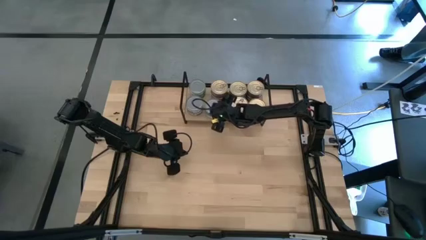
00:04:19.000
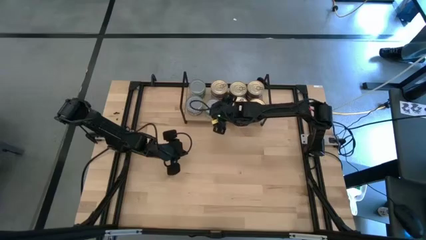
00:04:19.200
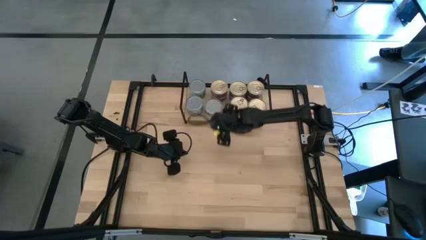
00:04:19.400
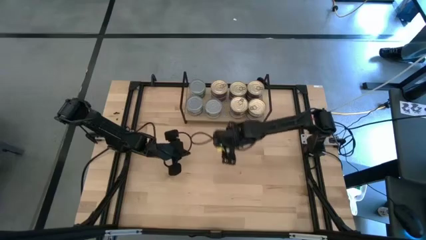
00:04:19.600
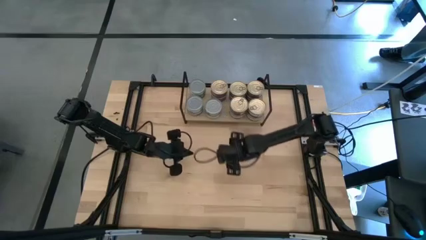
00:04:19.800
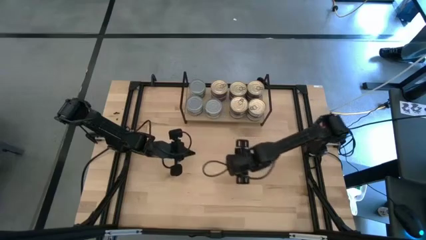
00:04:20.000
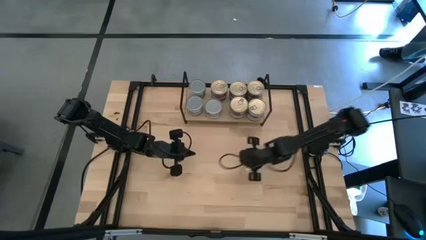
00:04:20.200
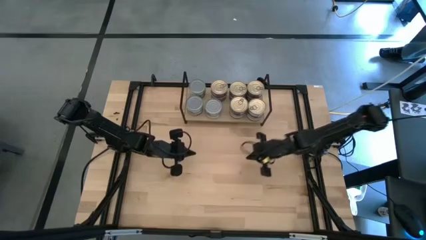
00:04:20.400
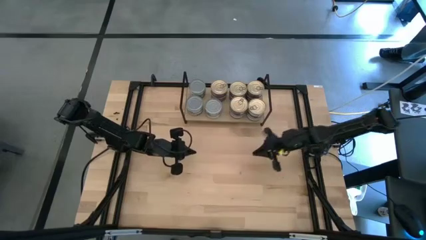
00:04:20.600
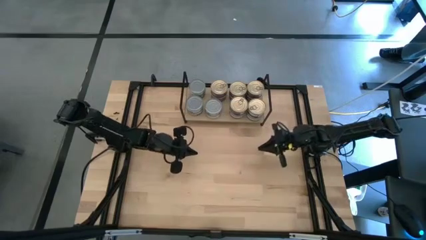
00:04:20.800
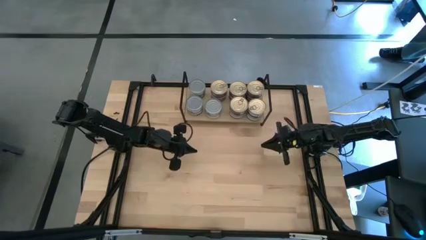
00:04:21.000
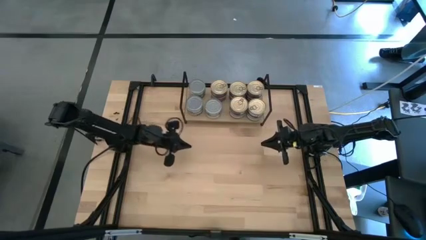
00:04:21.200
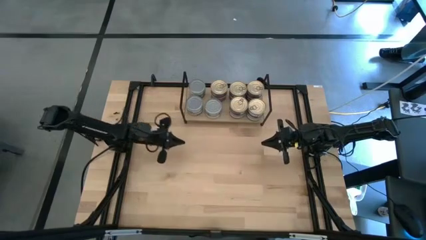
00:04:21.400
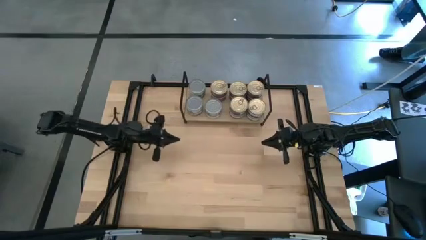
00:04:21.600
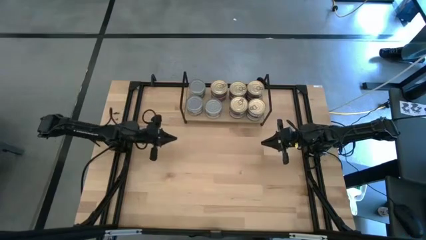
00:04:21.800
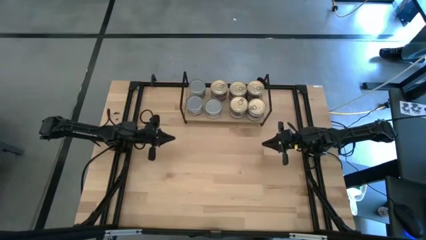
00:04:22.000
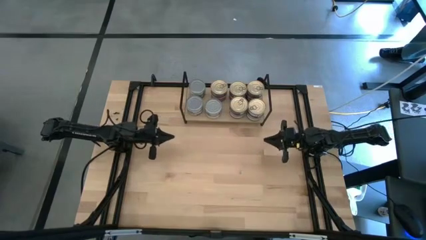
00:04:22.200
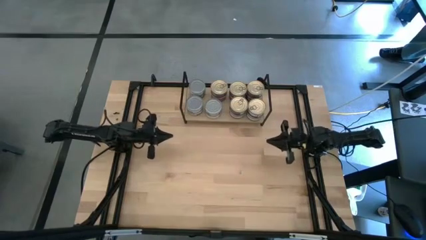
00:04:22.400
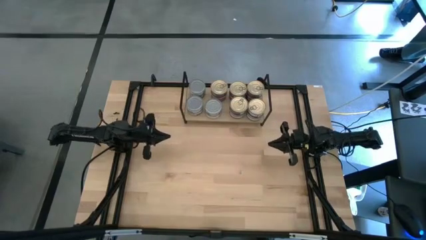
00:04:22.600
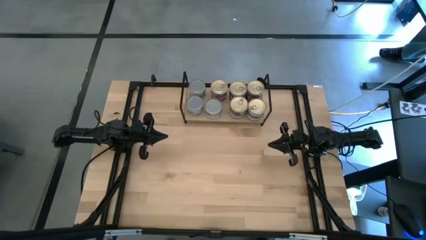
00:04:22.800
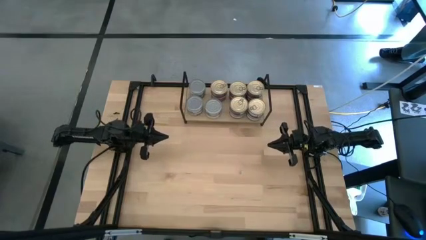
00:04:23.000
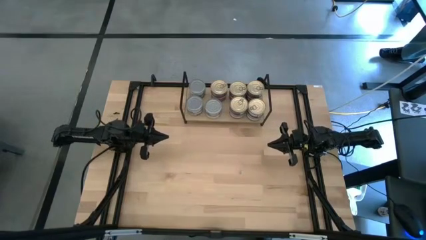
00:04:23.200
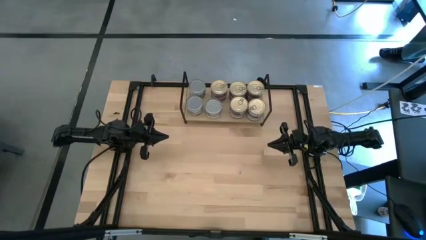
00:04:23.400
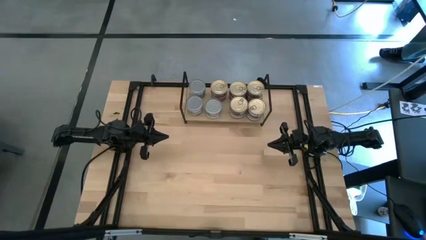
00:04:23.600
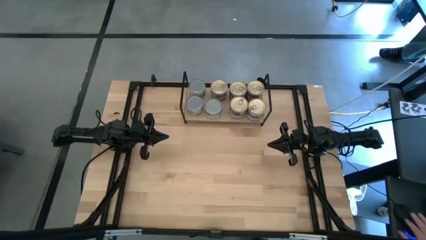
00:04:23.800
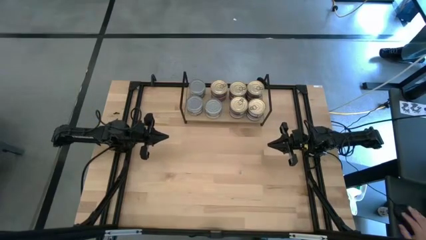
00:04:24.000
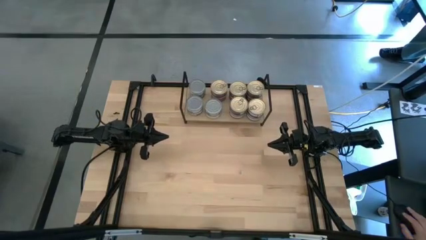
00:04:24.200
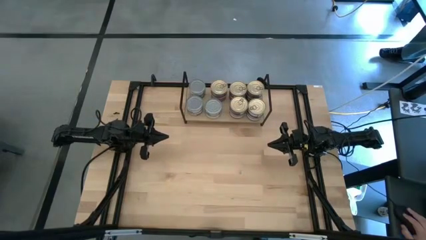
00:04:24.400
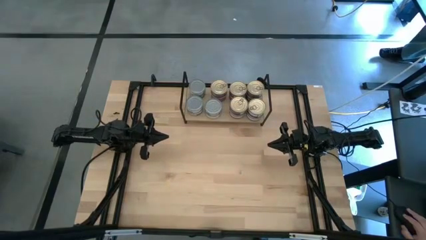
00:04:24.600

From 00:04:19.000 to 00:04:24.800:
Task: Stack canned seafood by type on shelf
Return to Home Position

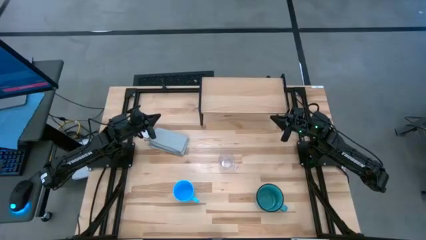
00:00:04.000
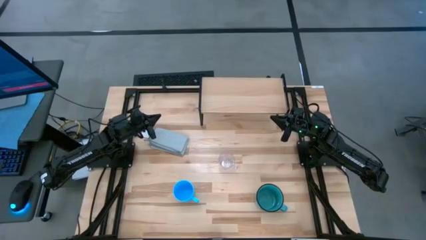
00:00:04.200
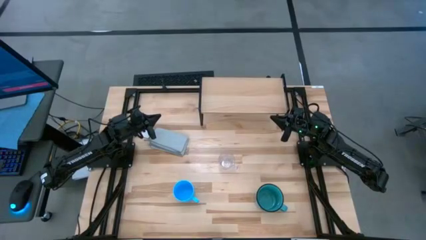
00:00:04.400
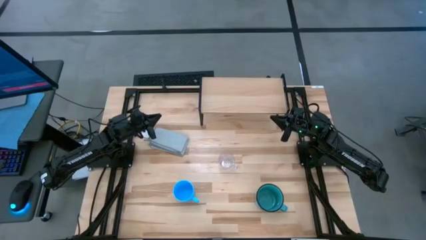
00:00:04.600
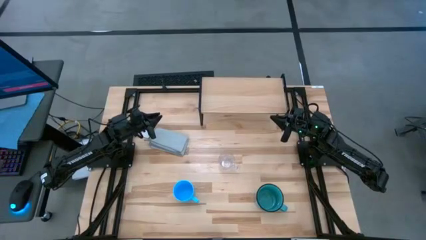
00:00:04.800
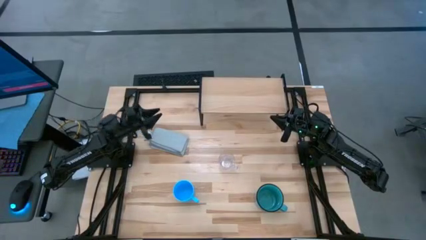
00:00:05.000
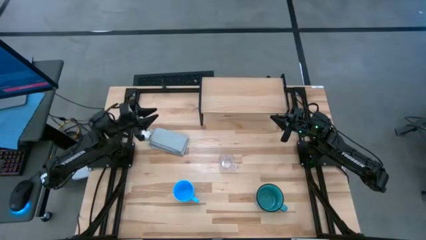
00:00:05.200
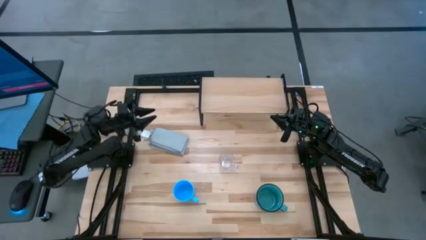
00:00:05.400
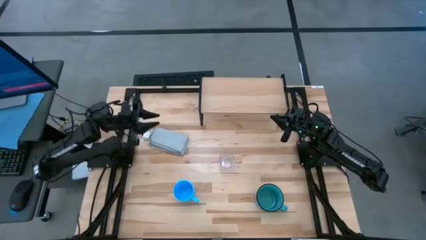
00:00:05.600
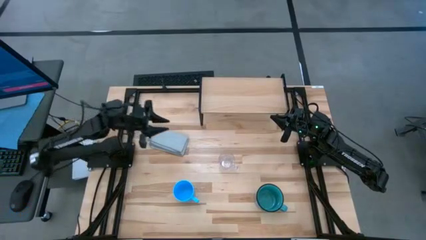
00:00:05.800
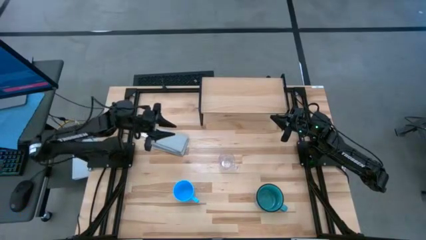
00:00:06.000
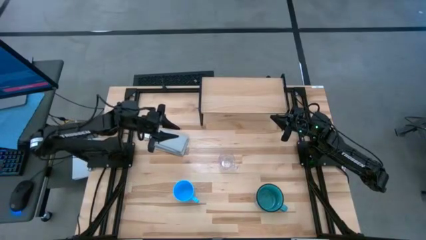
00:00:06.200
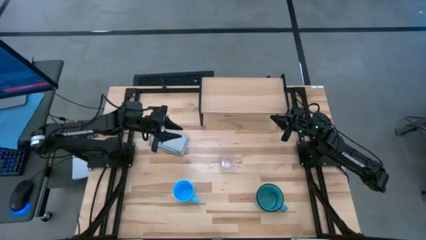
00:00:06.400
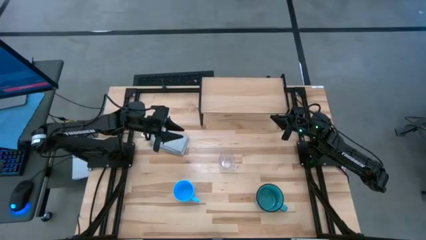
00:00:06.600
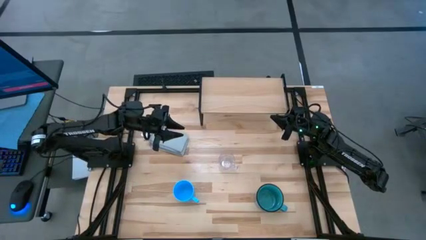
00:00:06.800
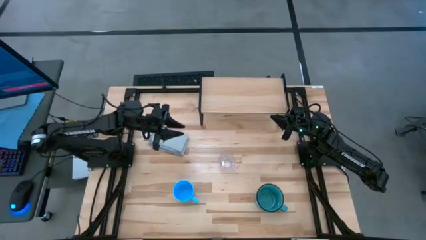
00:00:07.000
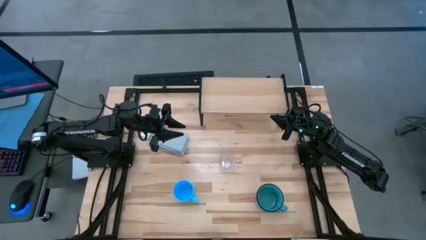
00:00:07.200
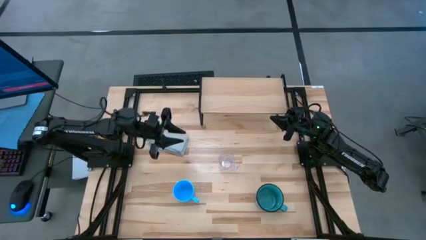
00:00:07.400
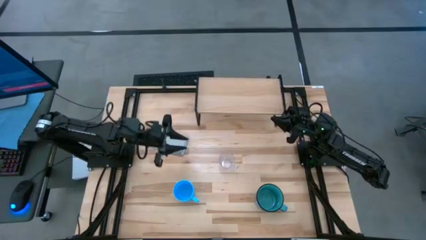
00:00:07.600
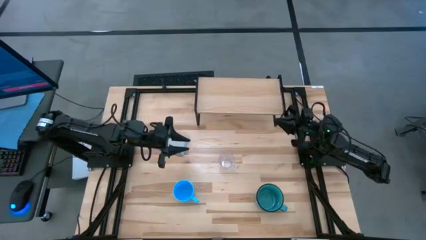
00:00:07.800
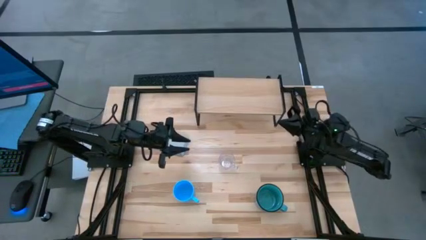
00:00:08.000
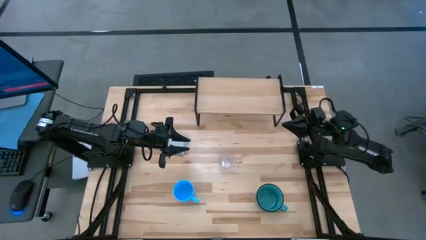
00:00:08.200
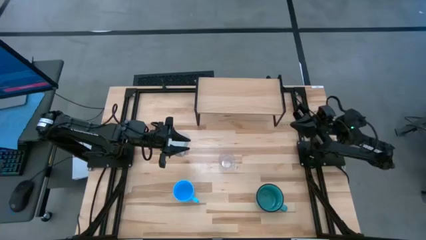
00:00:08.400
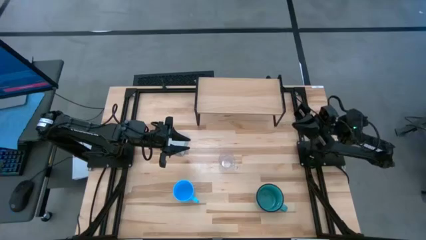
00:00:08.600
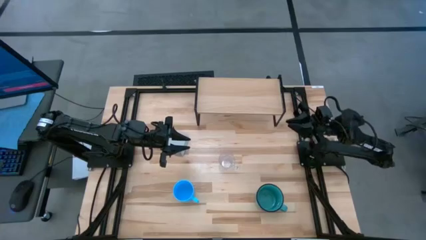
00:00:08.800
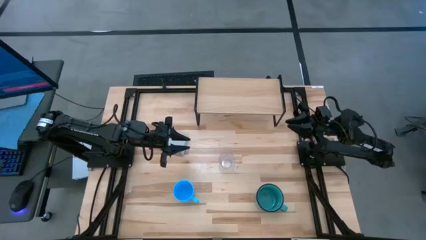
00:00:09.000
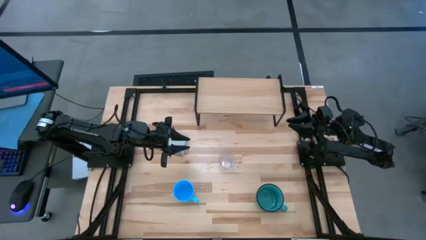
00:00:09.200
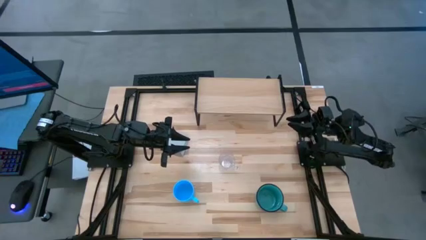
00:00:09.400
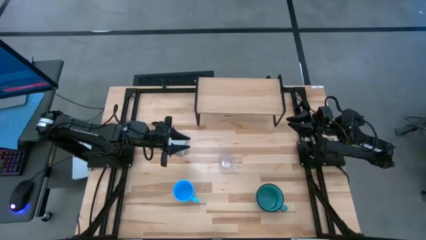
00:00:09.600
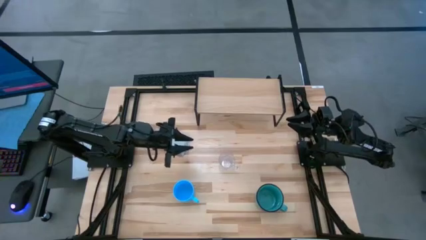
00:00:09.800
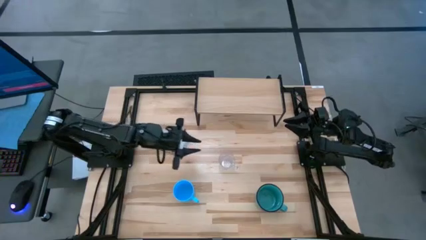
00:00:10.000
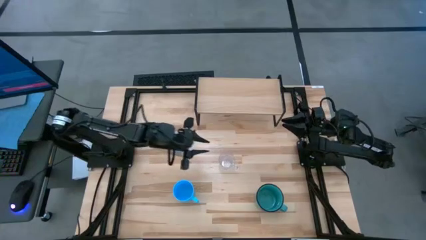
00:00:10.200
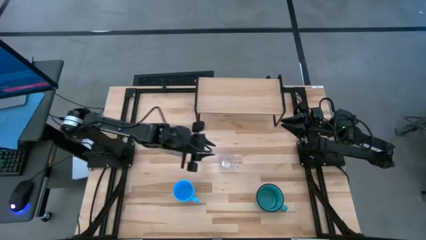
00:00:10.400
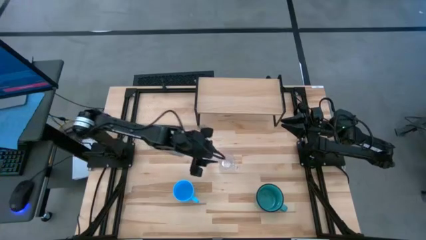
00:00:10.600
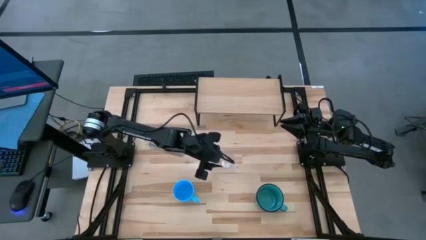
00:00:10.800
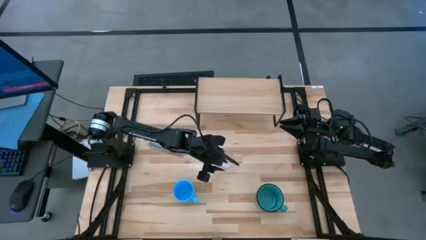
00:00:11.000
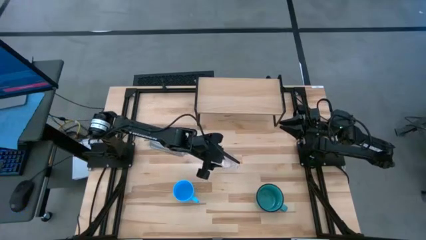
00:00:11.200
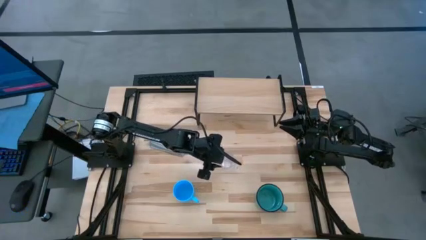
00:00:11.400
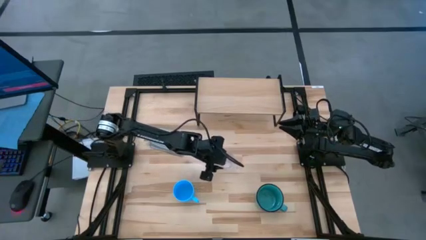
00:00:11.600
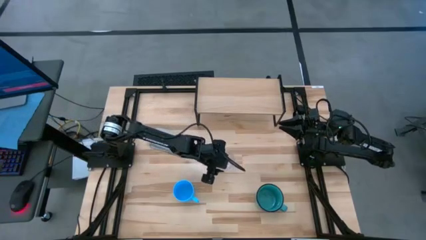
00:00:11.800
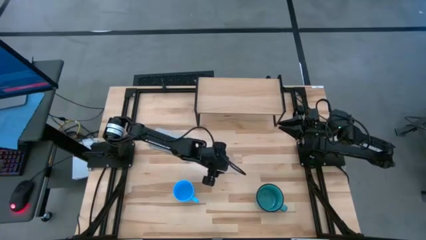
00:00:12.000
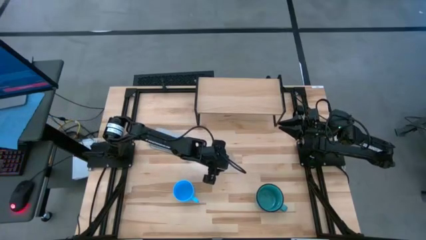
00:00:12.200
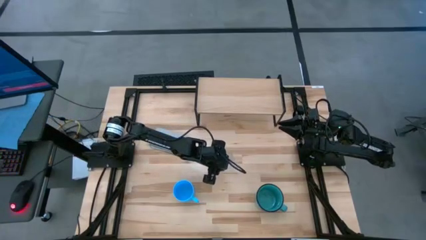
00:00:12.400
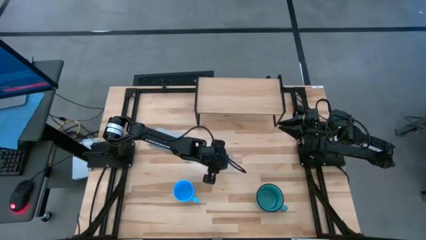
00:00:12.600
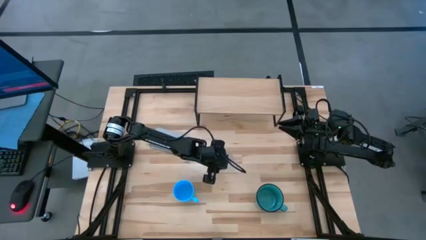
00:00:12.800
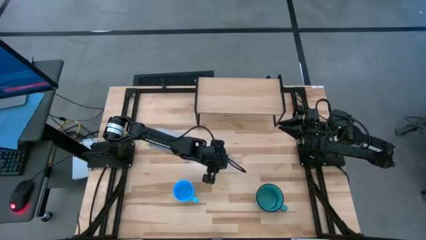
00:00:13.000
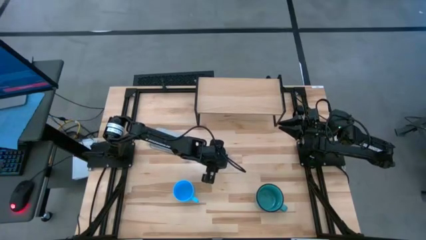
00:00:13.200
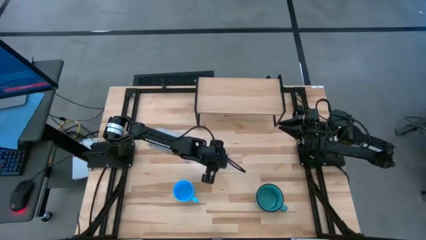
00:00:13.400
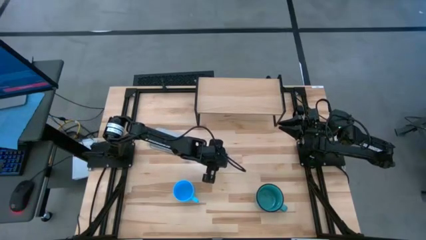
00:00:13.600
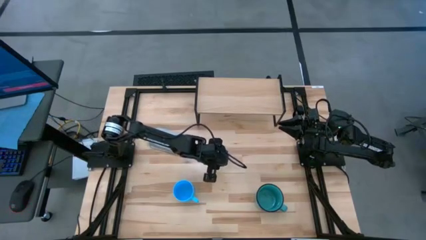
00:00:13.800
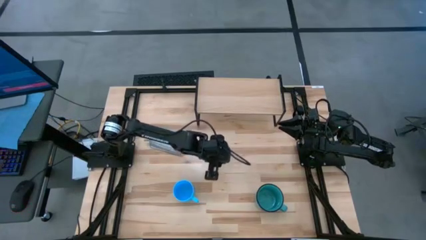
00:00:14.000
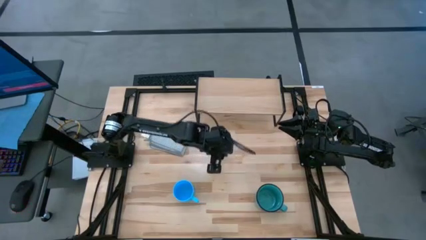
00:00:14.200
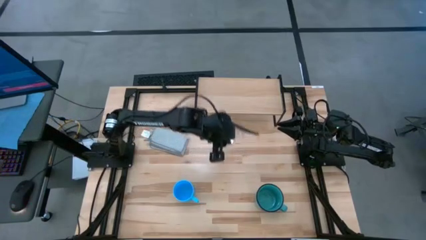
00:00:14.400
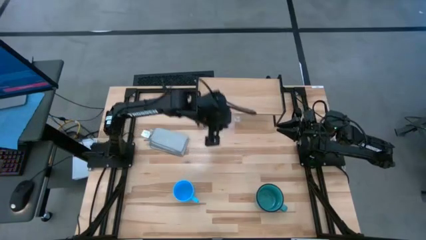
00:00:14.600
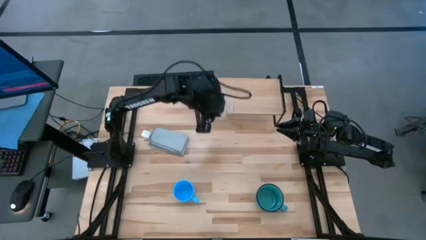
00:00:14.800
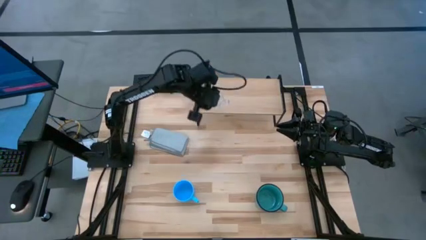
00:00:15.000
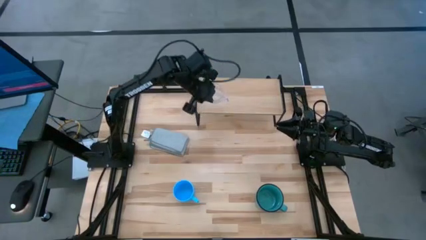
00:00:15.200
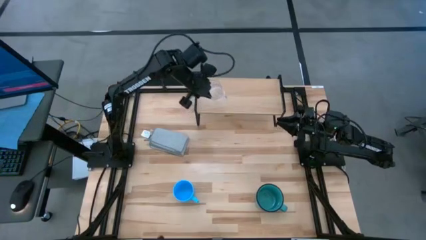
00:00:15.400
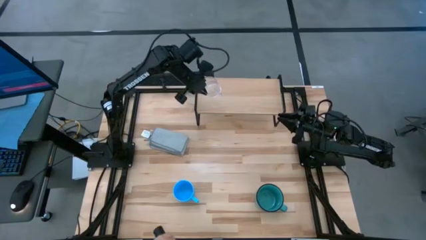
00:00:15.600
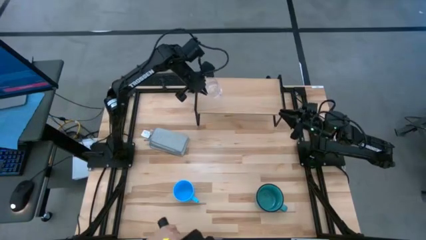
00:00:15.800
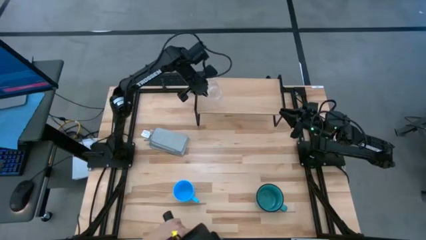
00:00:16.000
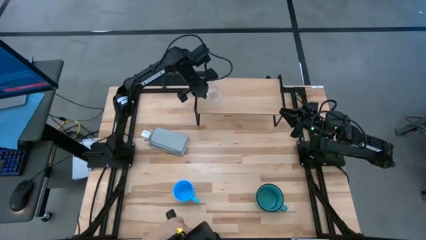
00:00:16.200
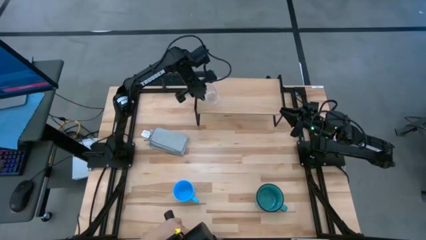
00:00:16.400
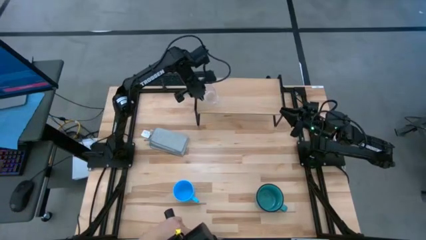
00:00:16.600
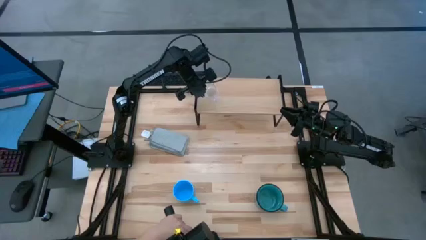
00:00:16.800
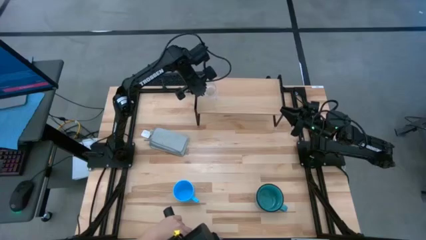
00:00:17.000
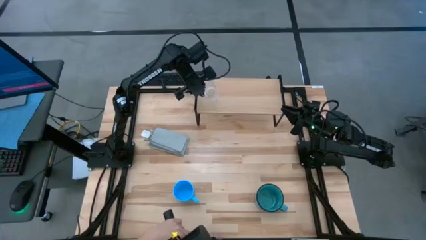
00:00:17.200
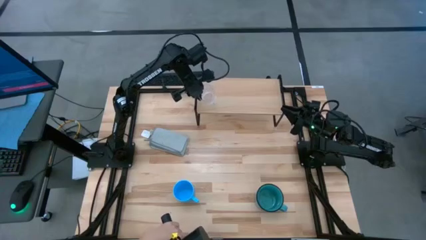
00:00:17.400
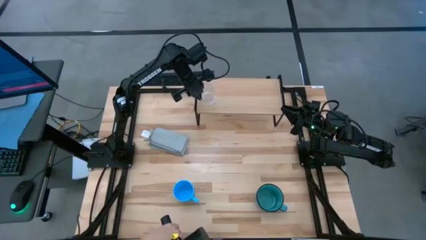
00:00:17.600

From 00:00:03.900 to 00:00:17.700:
Task: Stack small to large cups/mugs on shelf
Put the transparent mug on the shelf
